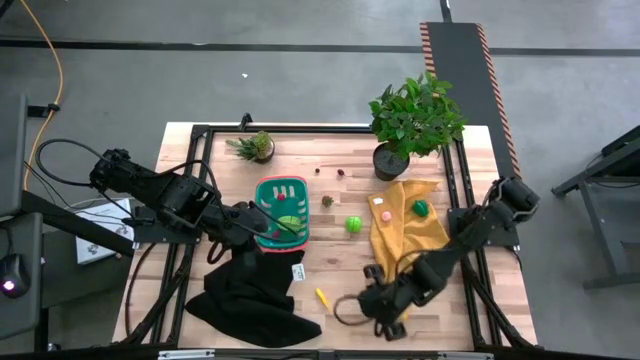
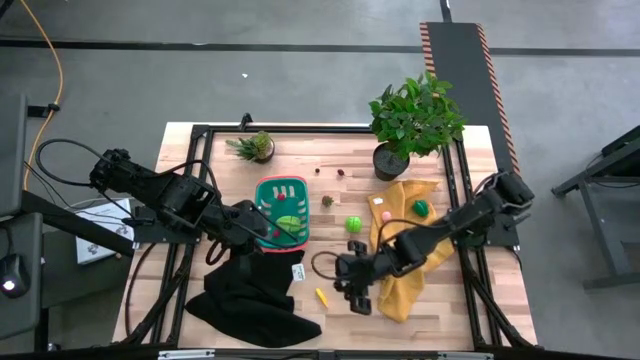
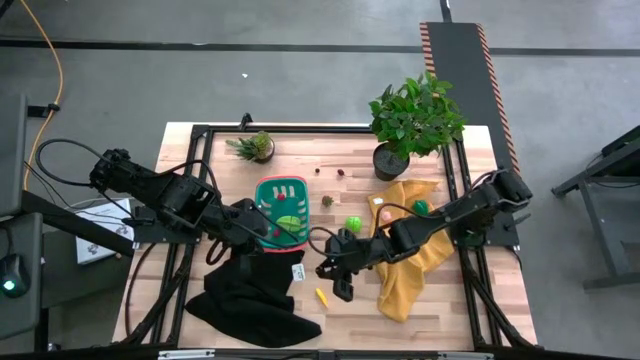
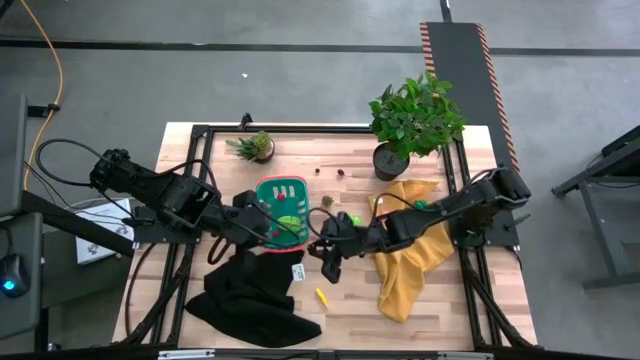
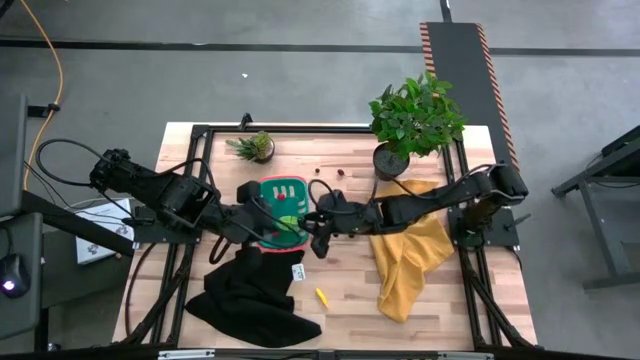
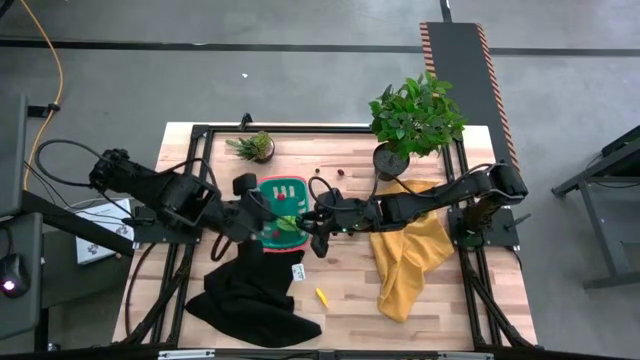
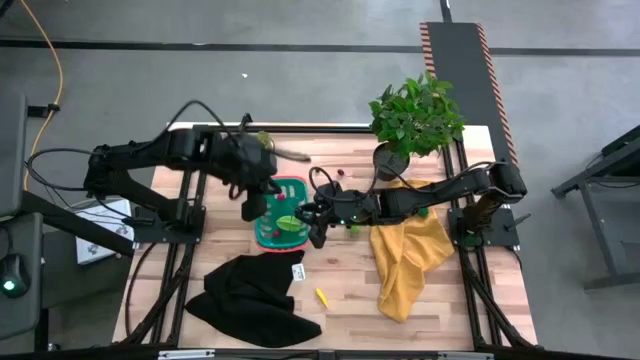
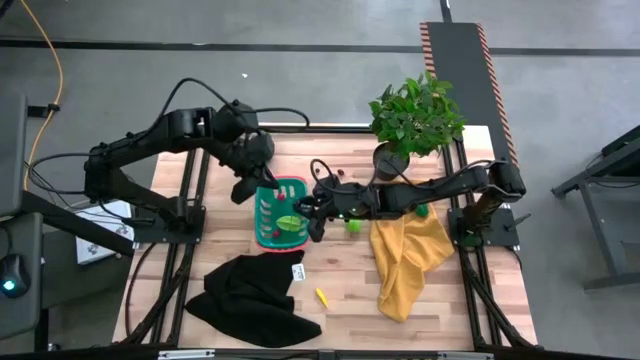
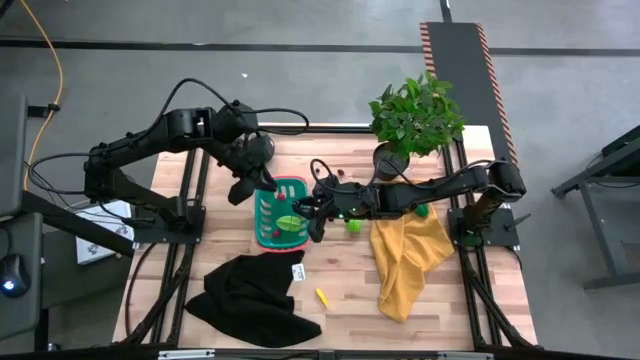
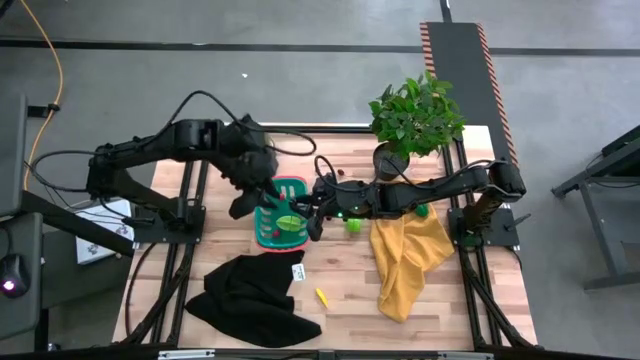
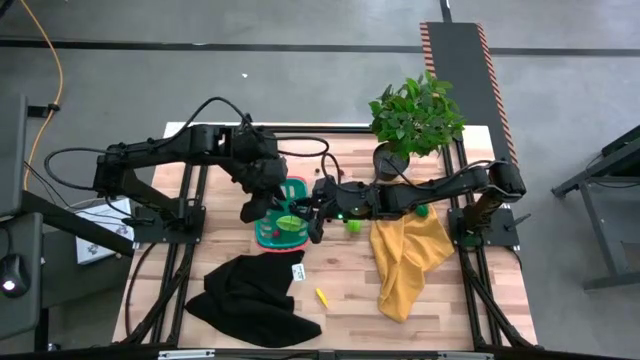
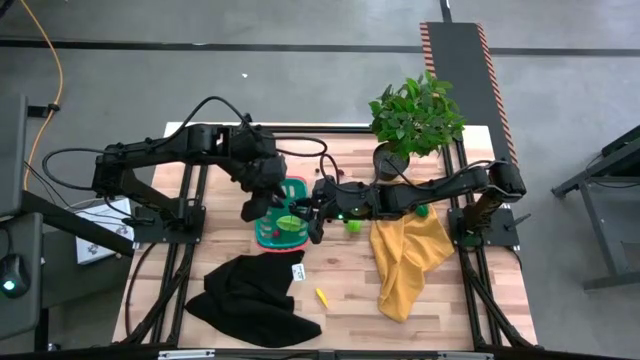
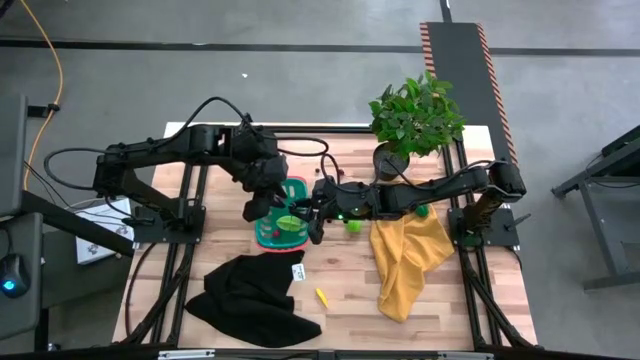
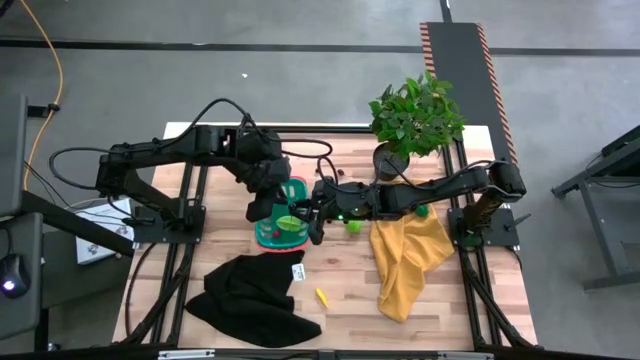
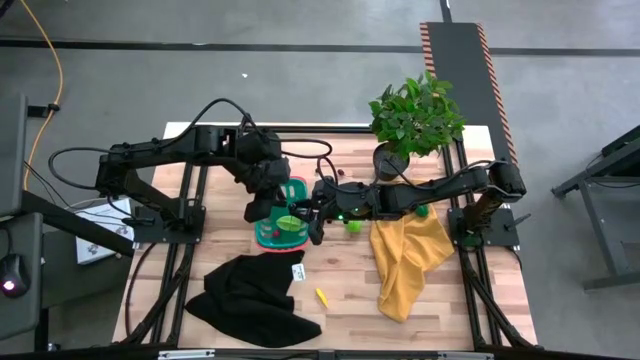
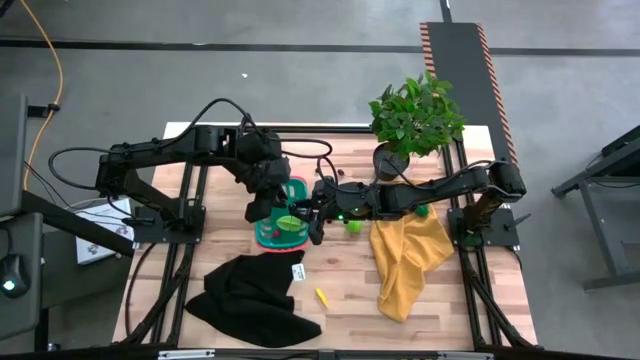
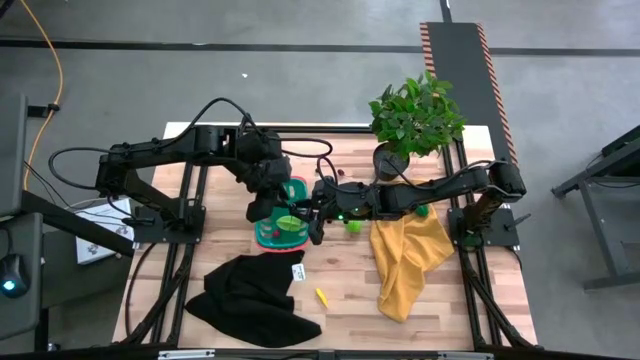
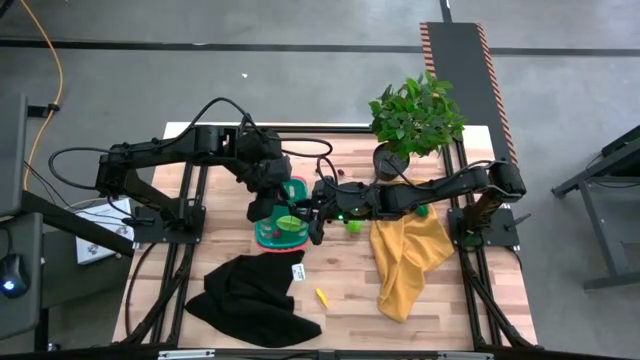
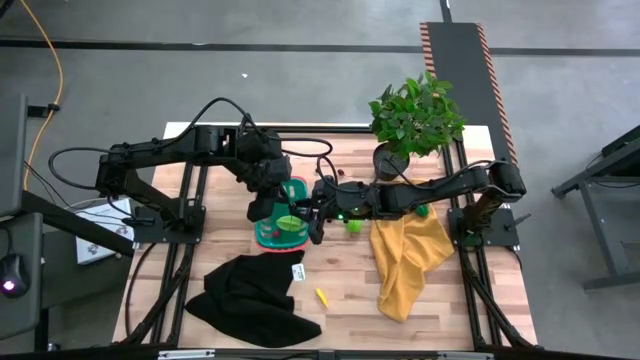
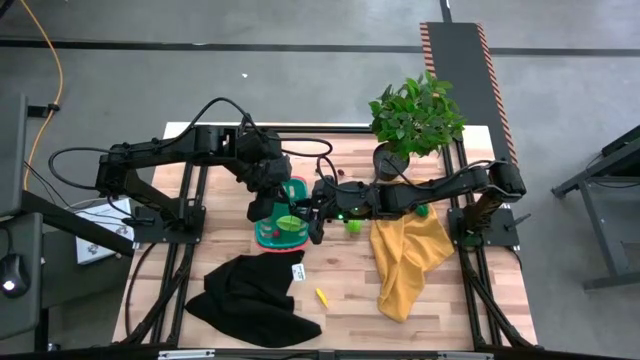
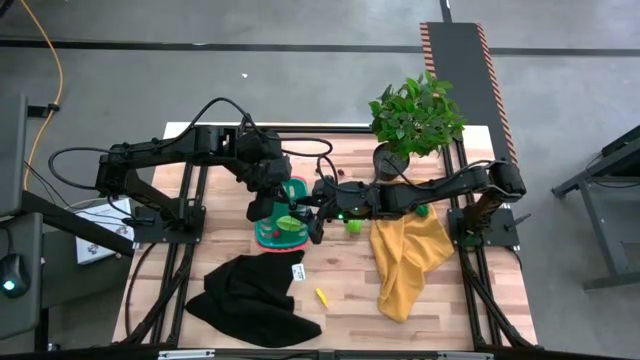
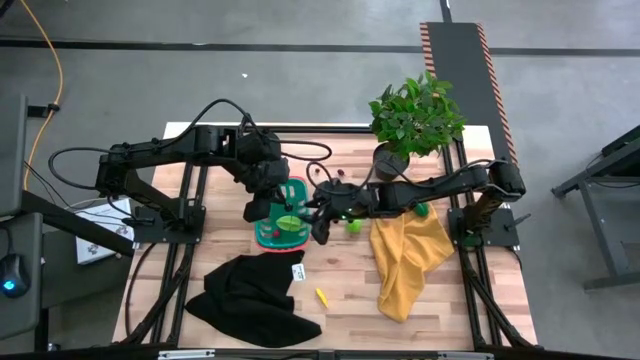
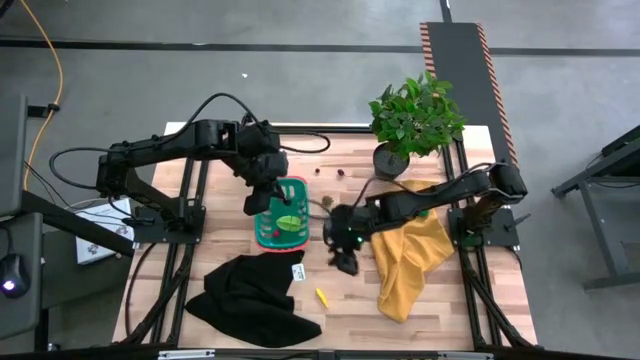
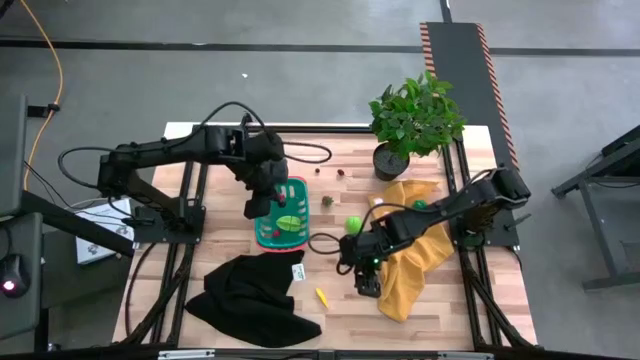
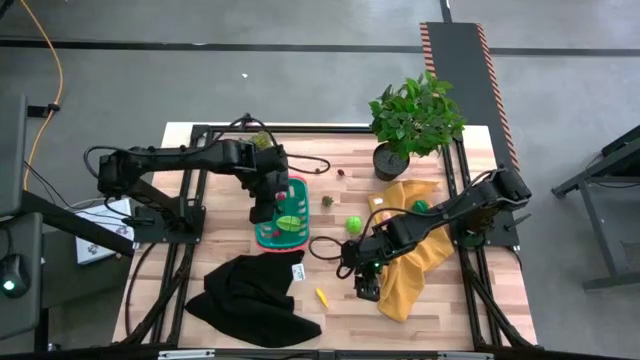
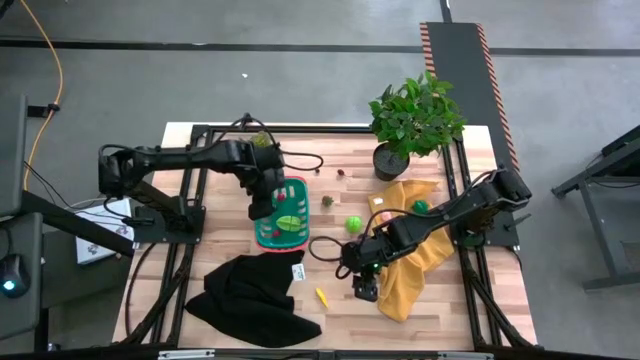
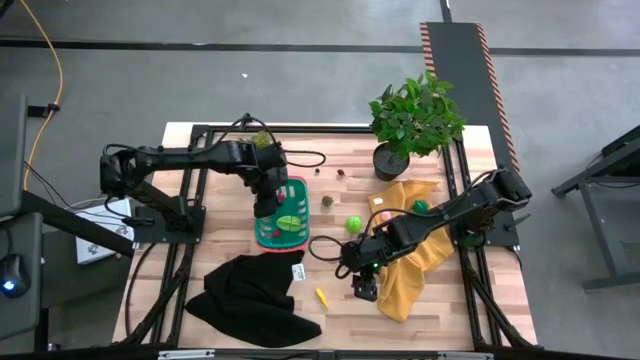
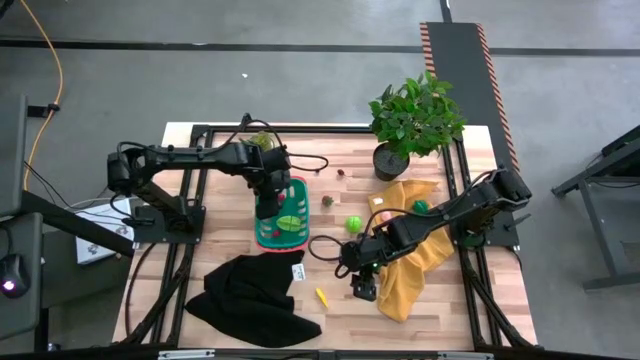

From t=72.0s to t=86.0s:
Task: Pick and placing Produce into tupperware
Put the black cherry in the green basket

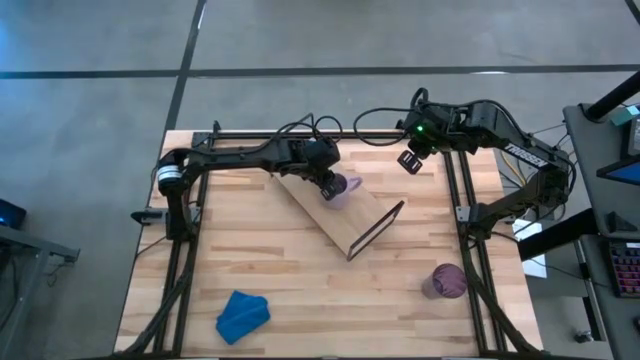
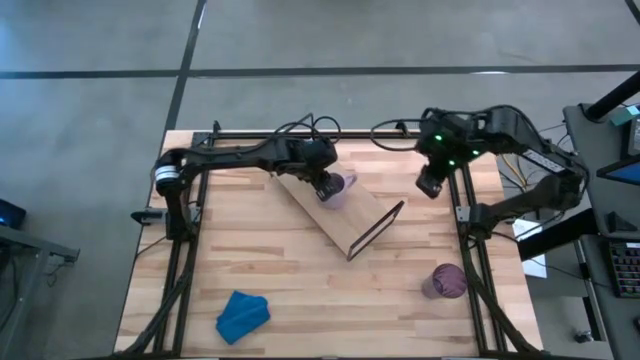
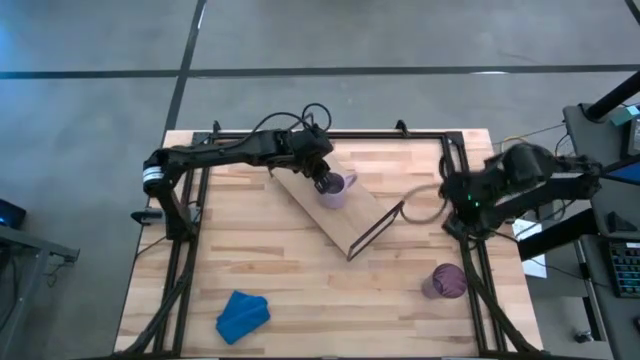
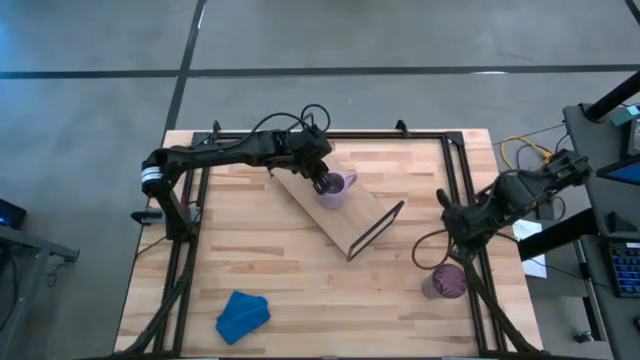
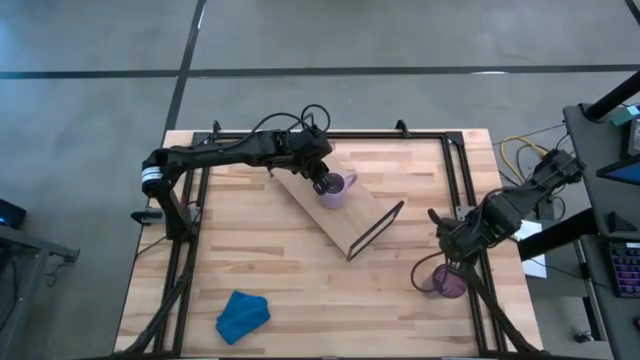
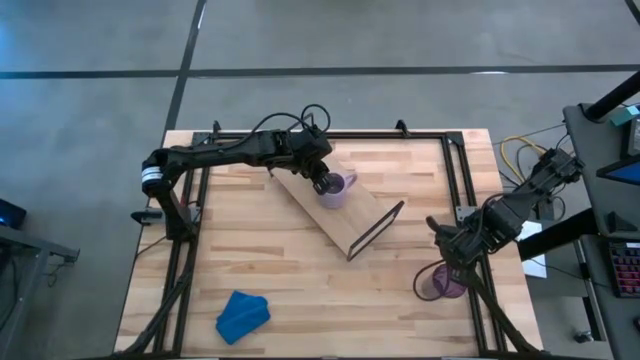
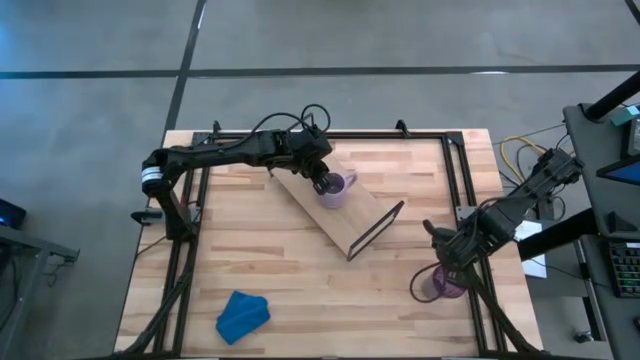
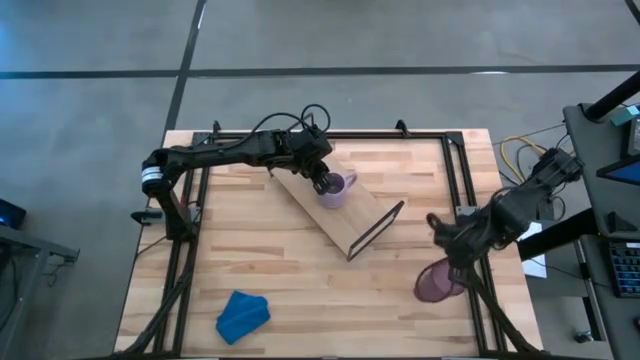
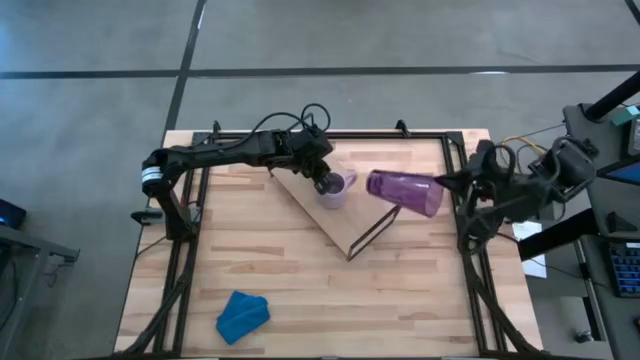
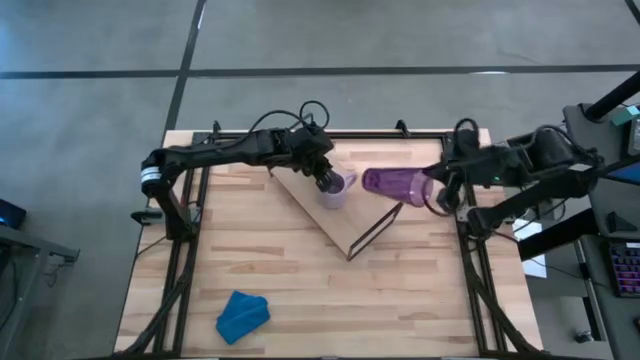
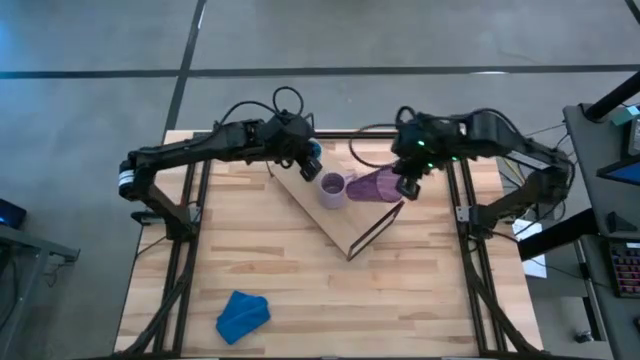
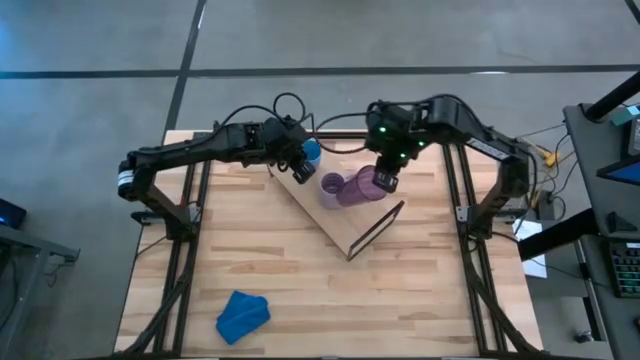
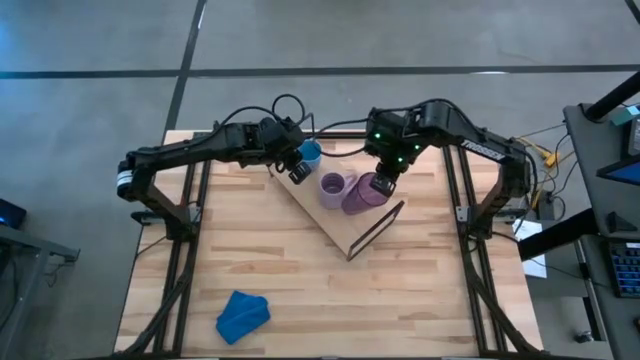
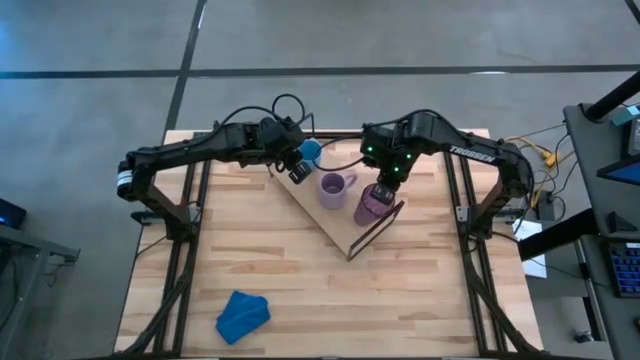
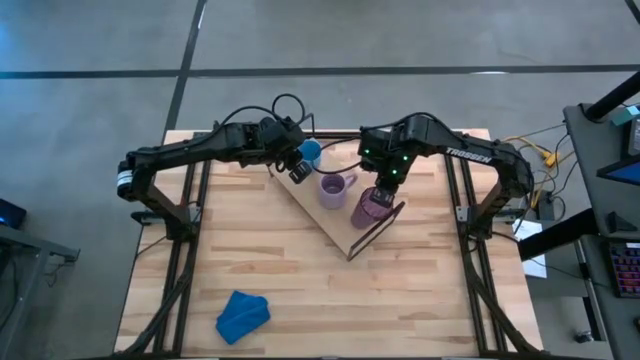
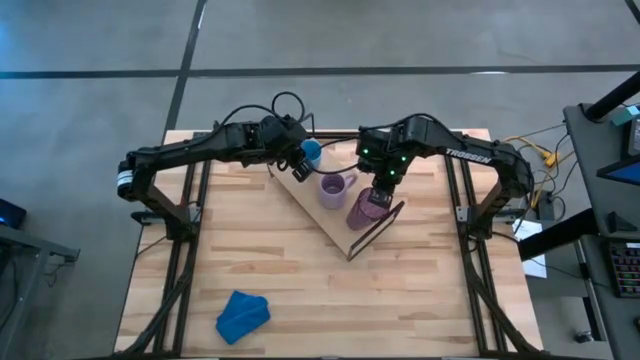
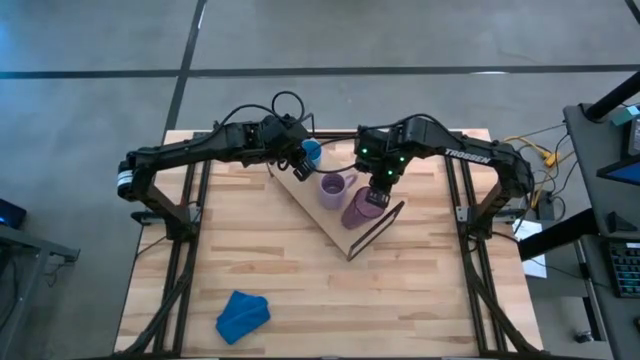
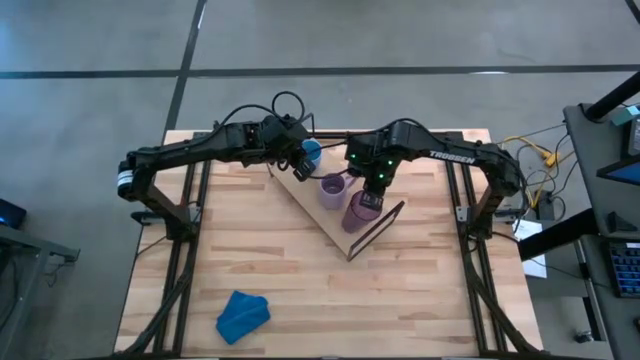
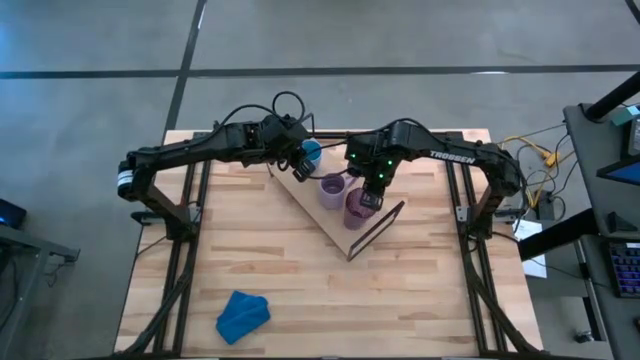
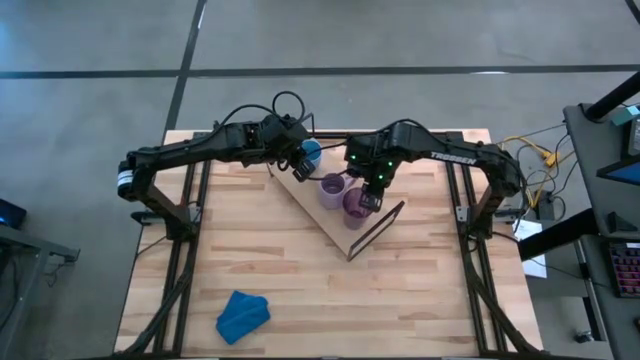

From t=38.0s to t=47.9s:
Task: Stack small to large cups/mugs on shelf
Put the purple cup on the shelf
